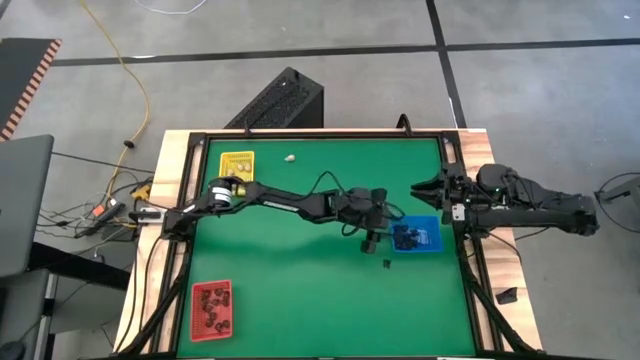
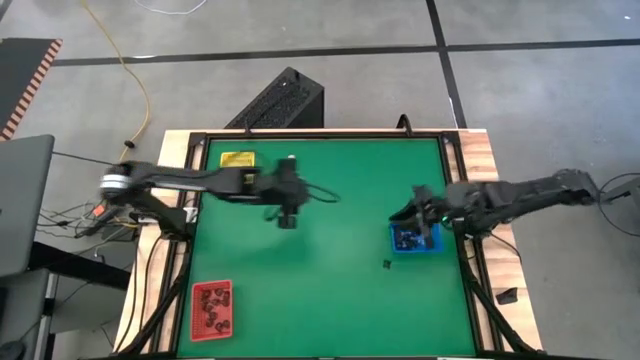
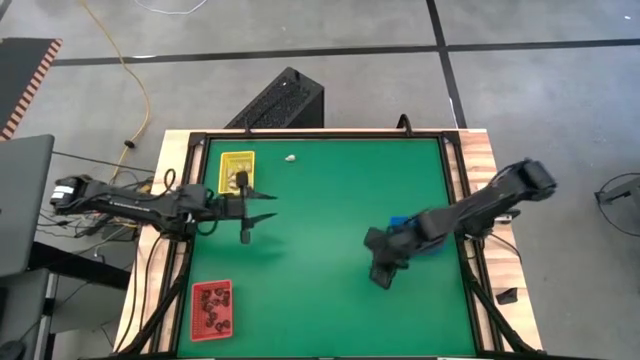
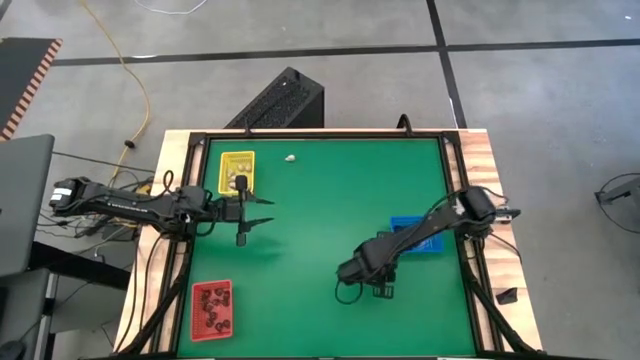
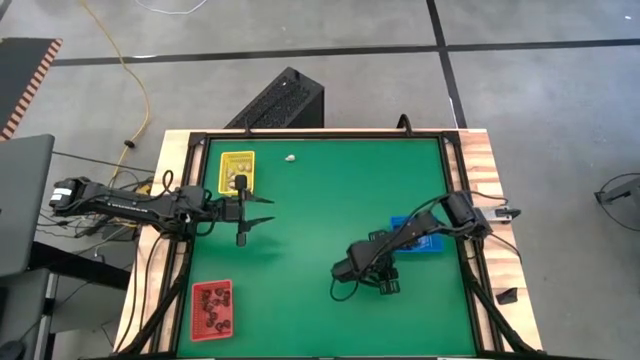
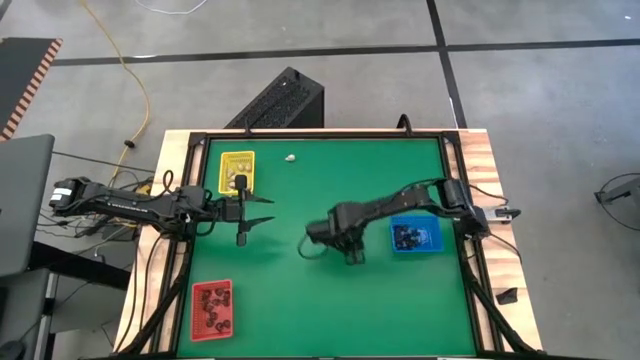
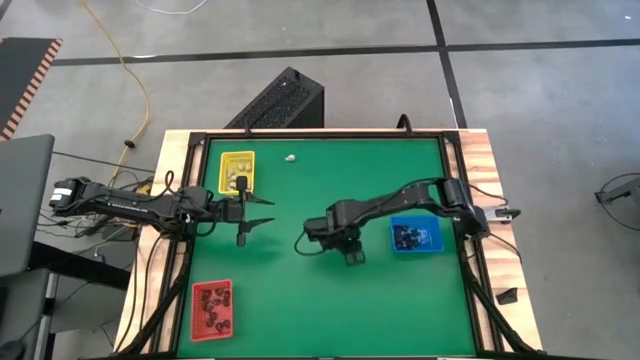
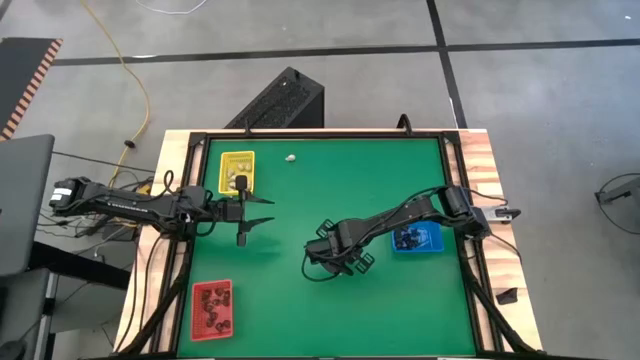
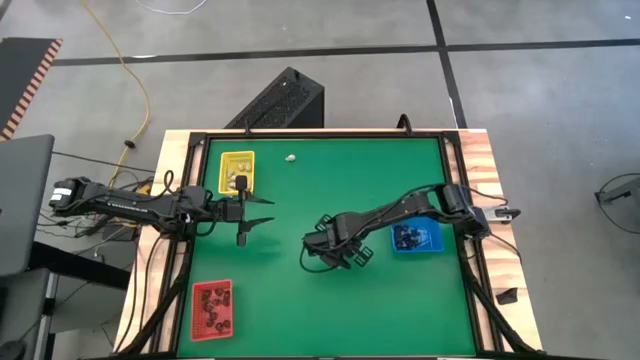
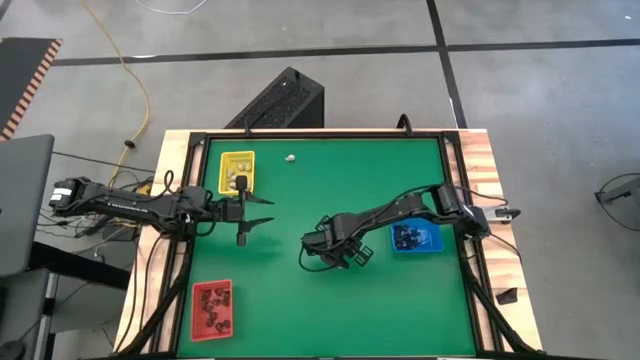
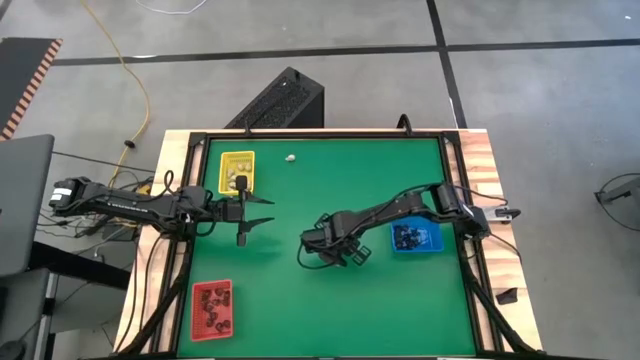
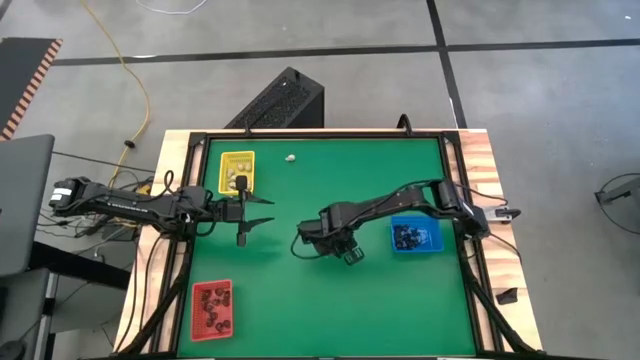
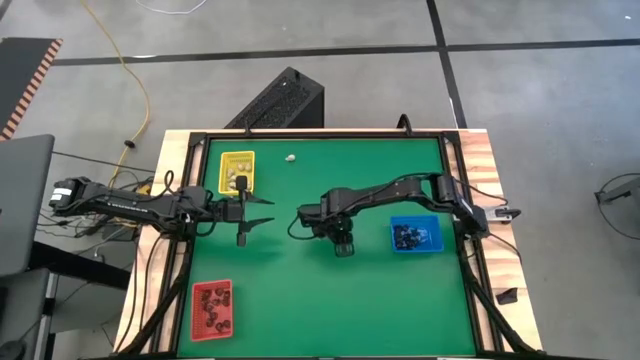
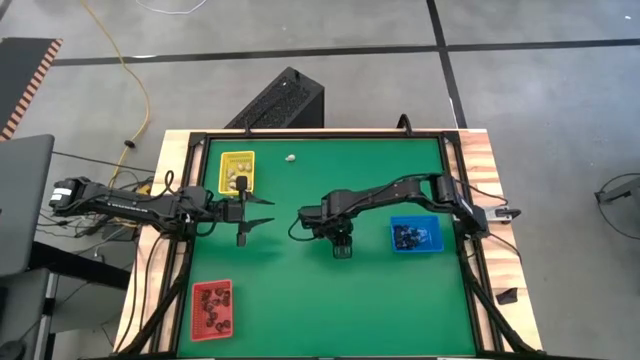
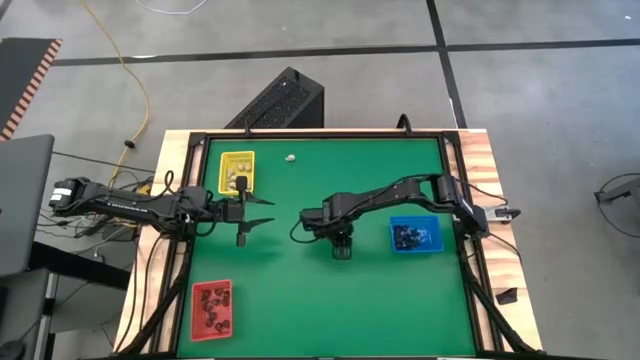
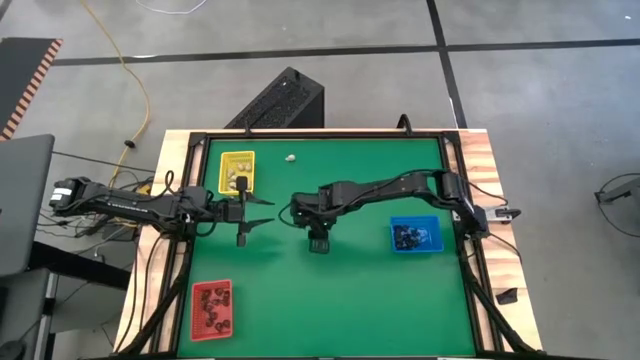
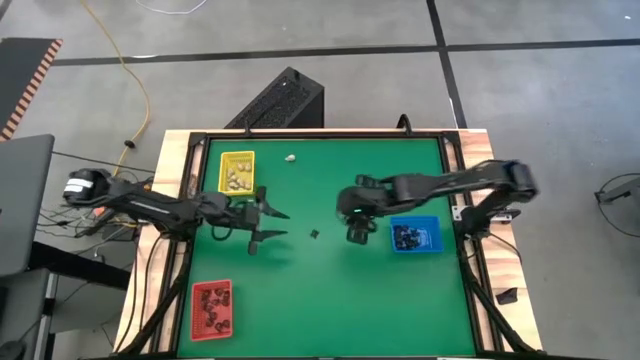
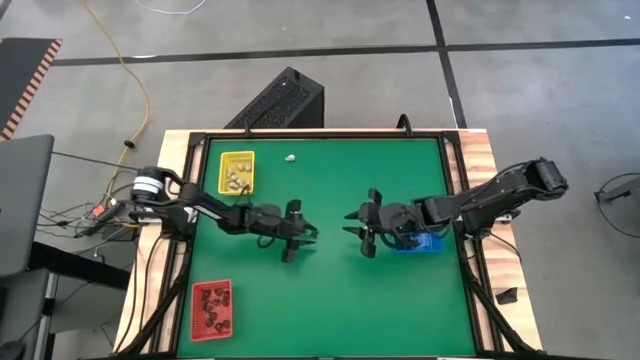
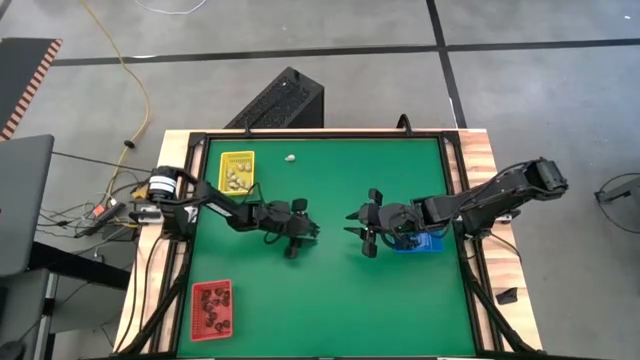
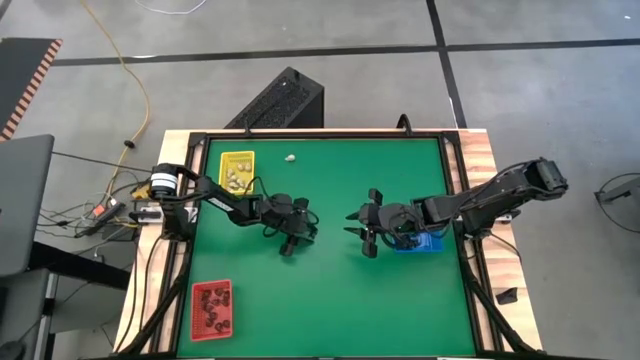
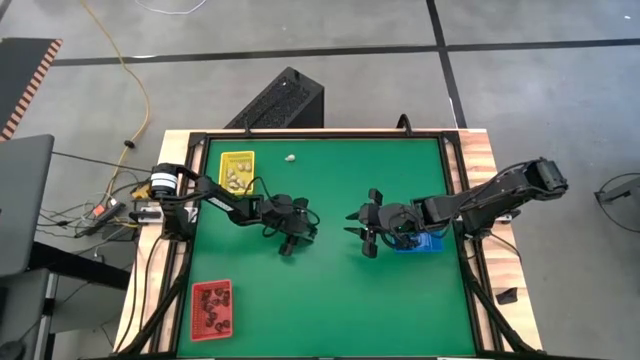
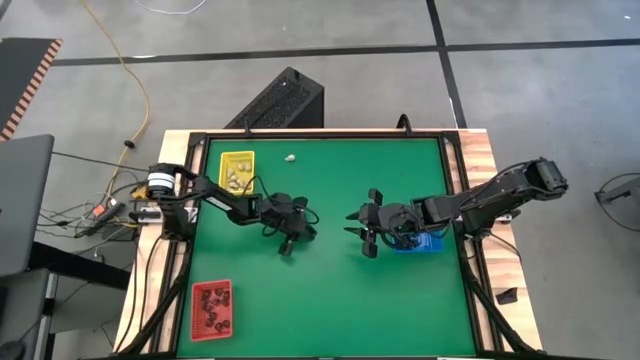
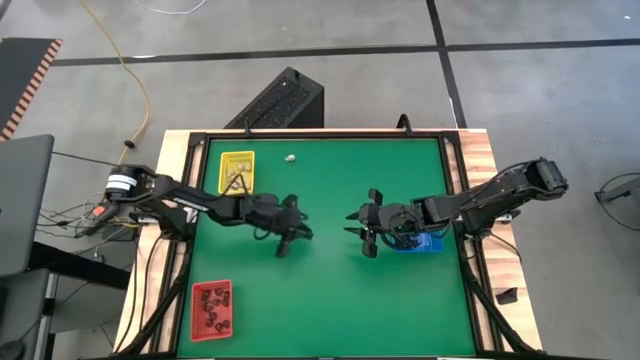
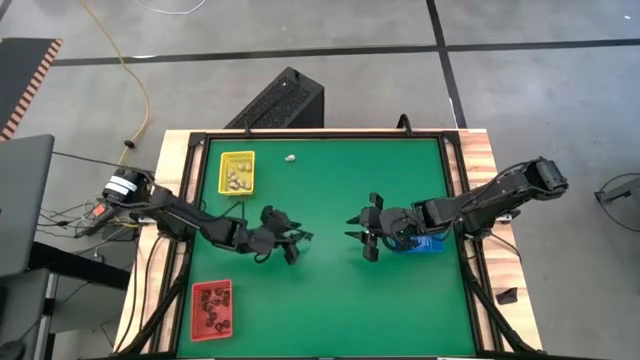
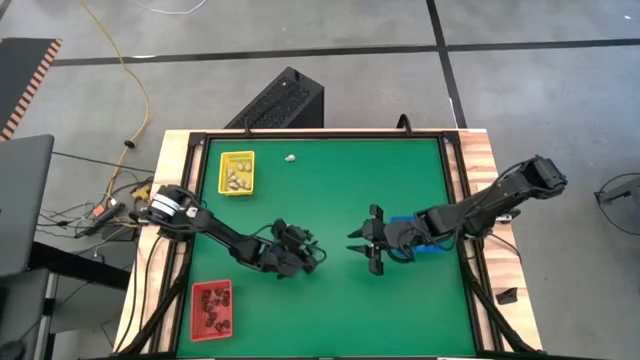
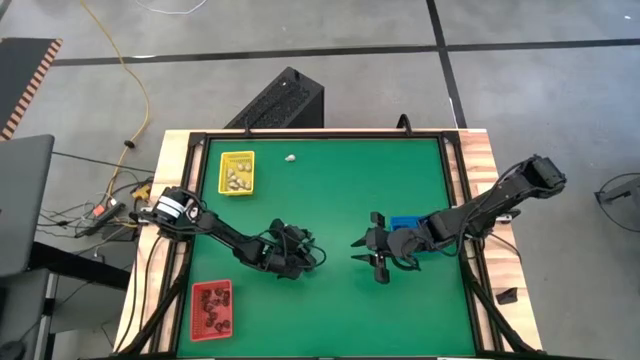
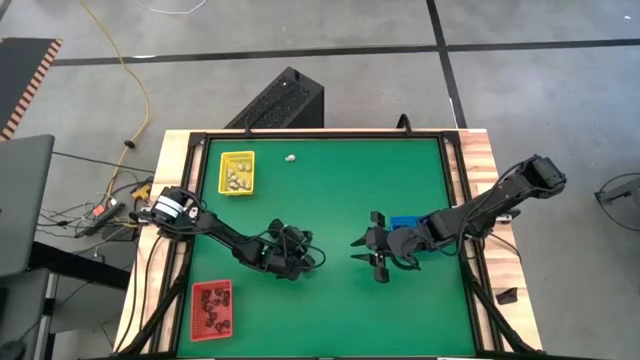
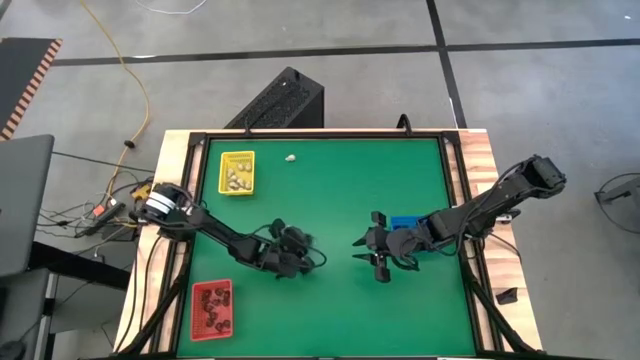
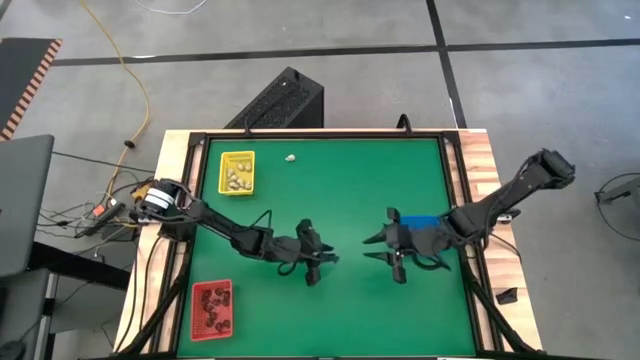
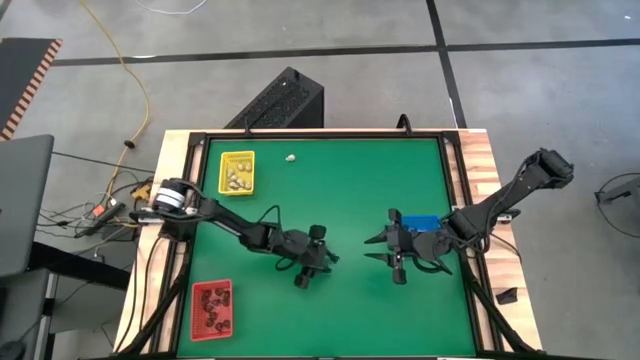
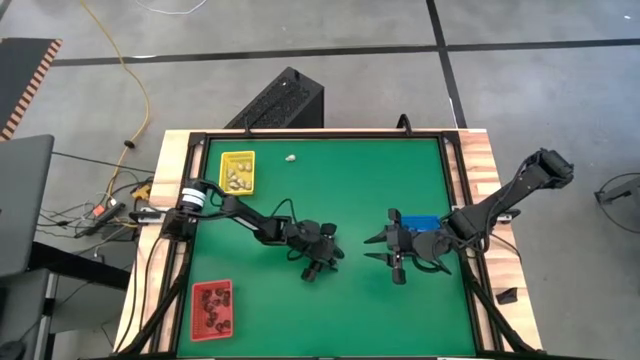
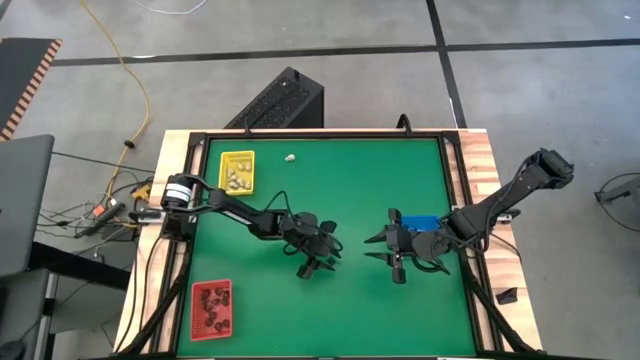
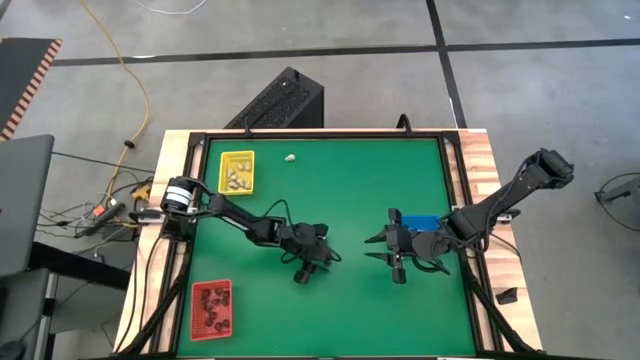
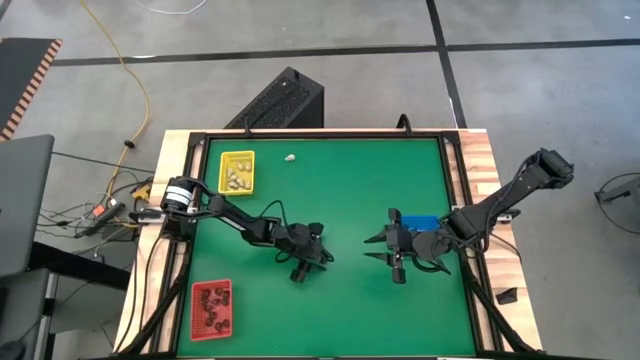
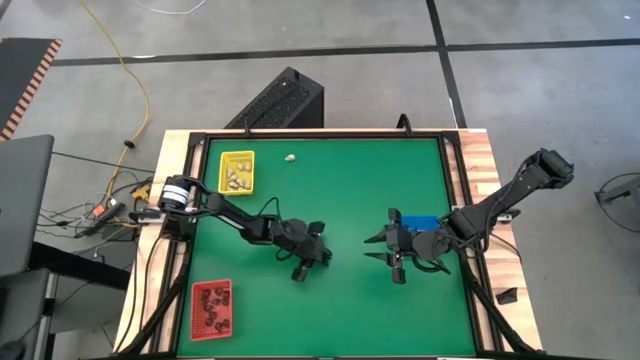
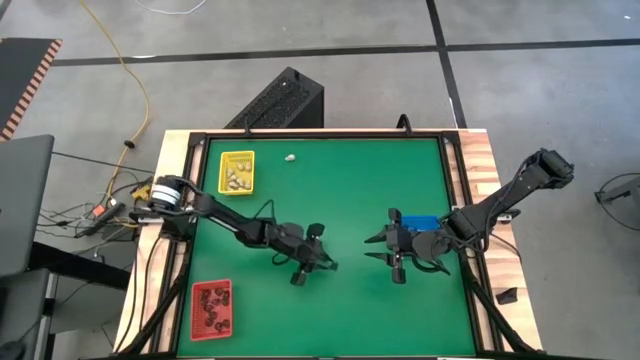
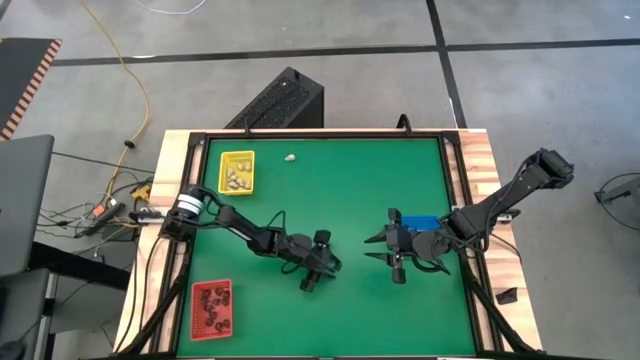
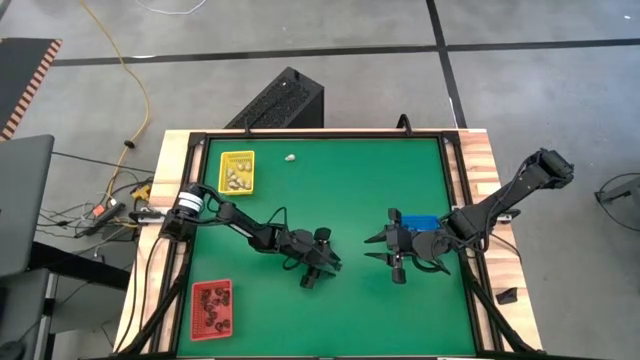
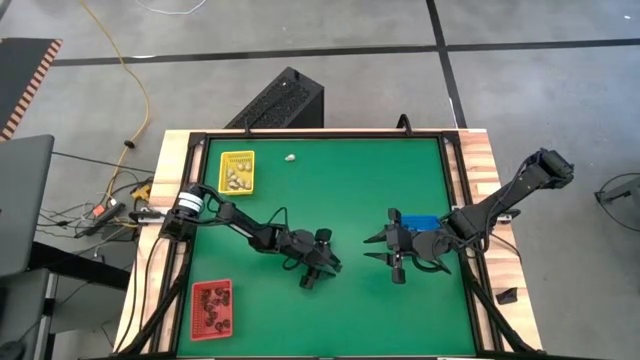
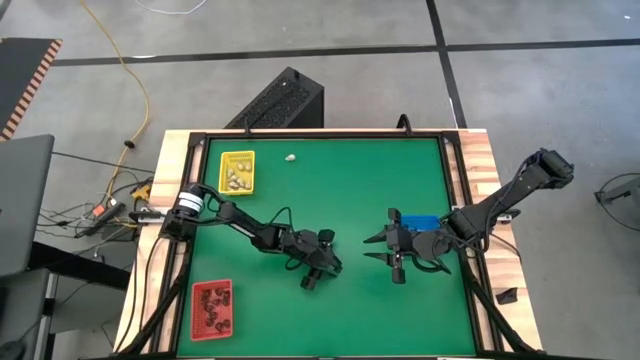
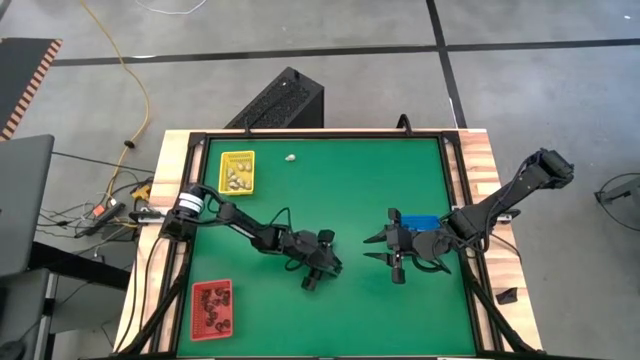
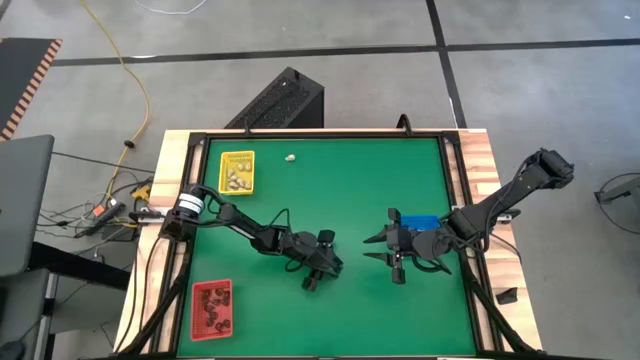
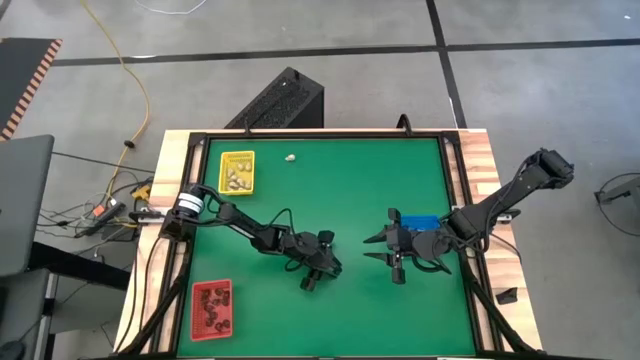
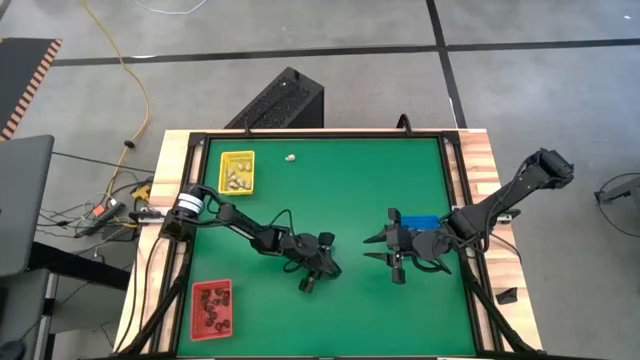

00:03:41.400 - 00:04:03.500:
Task: Sort Halloween decoration
Put the black spider toy into the blue bin
